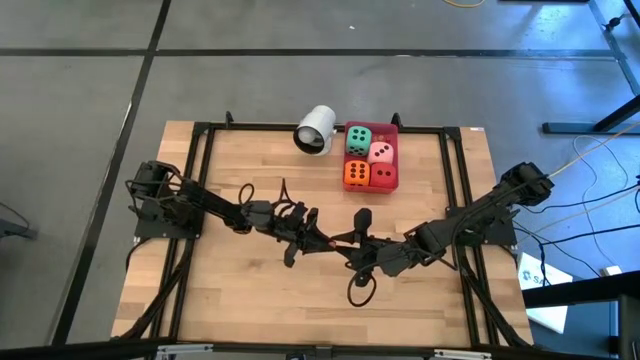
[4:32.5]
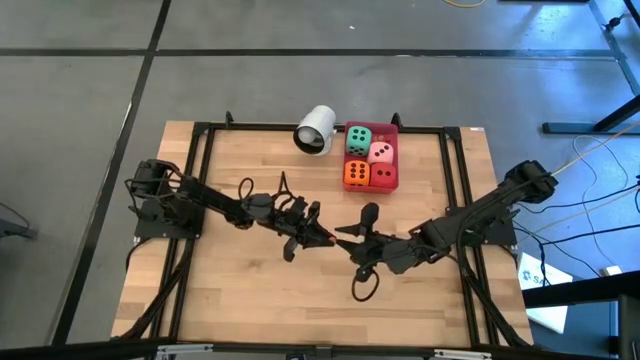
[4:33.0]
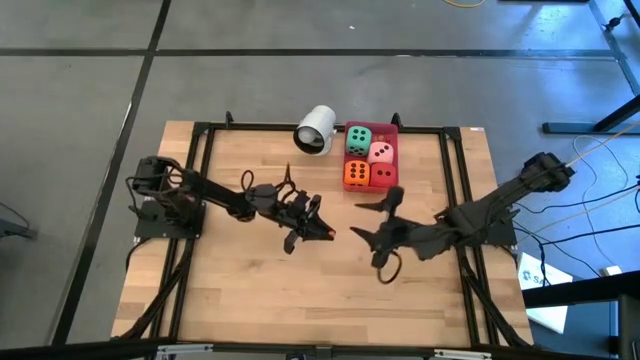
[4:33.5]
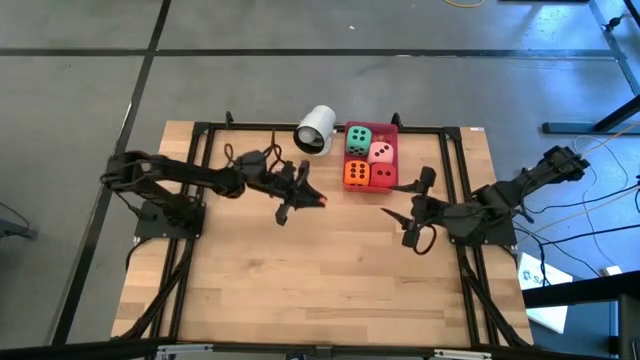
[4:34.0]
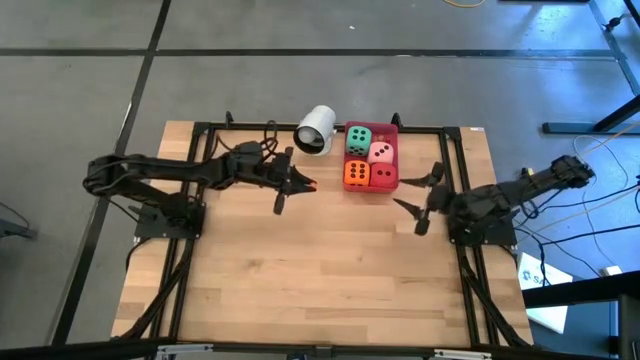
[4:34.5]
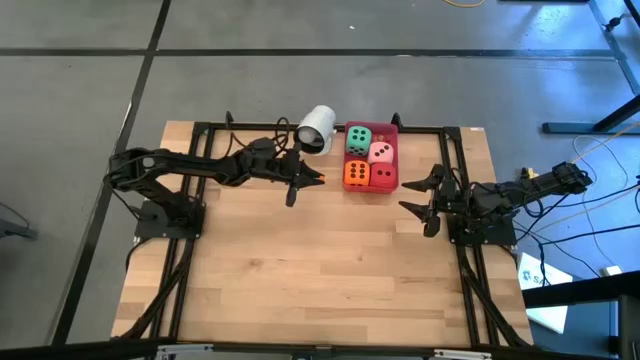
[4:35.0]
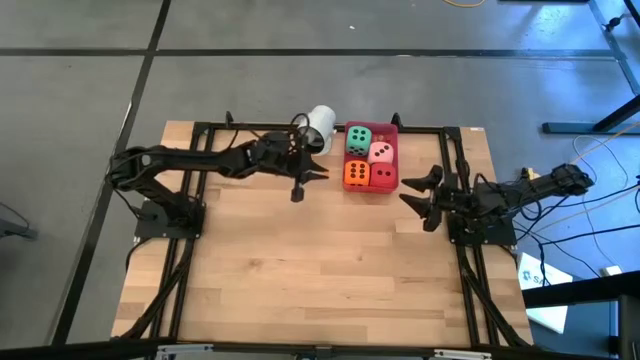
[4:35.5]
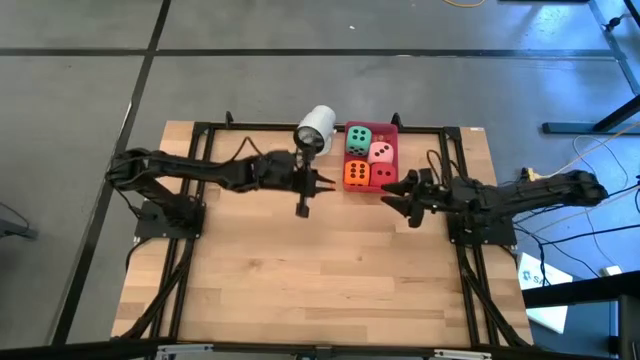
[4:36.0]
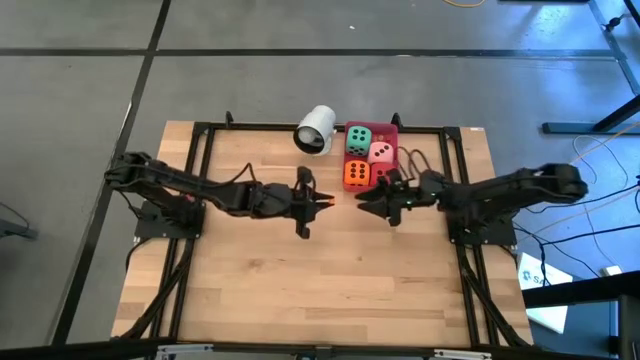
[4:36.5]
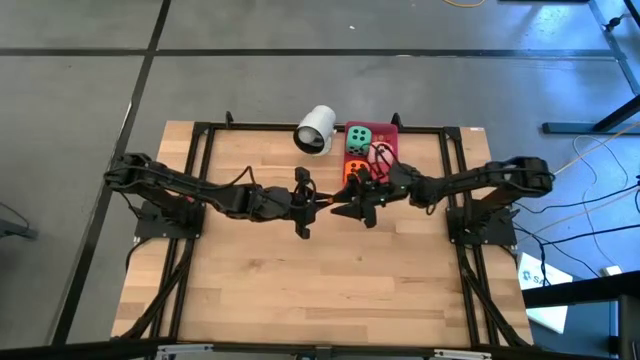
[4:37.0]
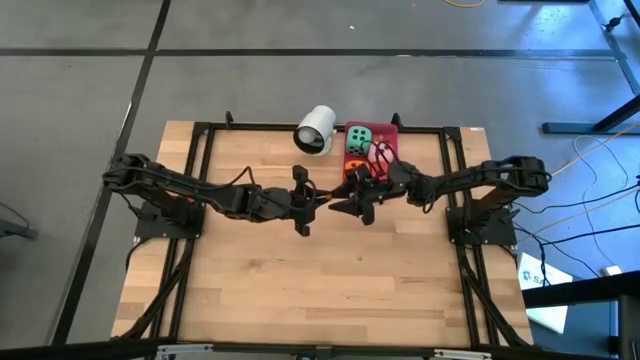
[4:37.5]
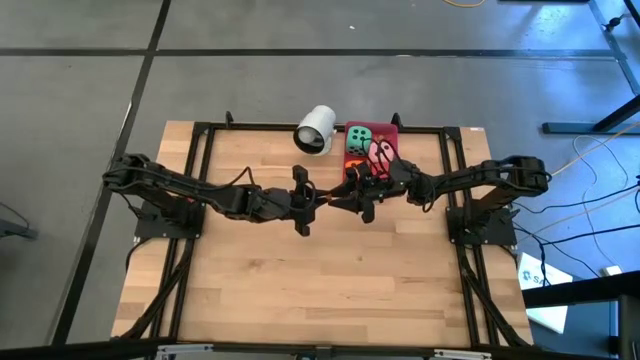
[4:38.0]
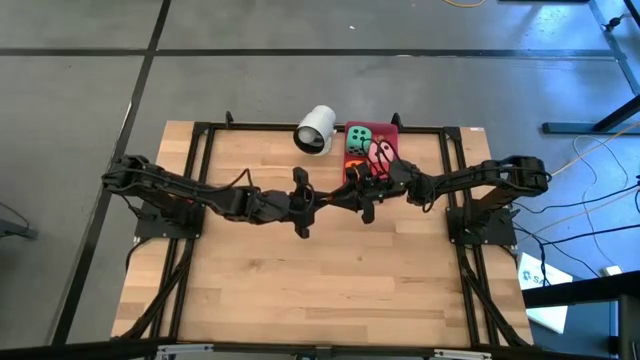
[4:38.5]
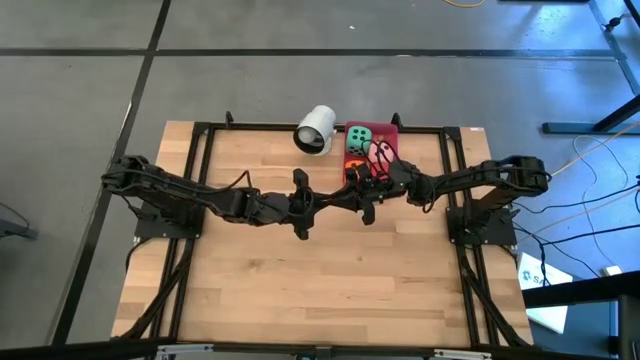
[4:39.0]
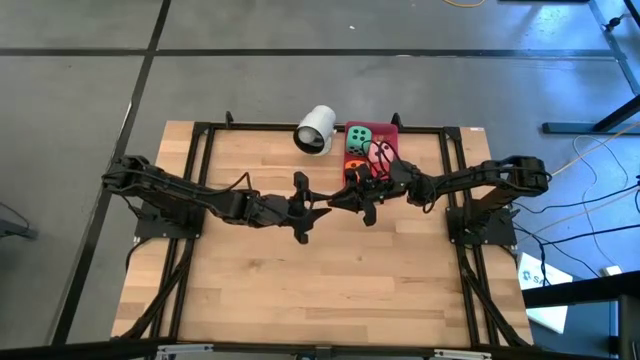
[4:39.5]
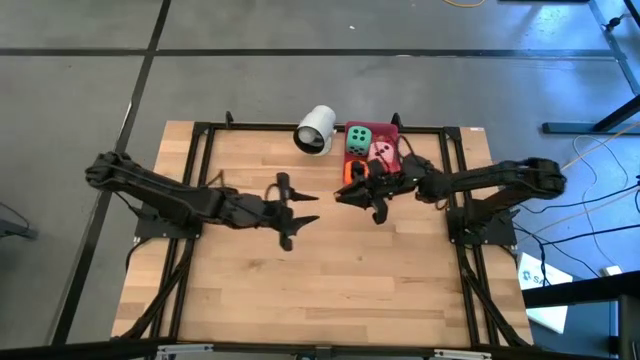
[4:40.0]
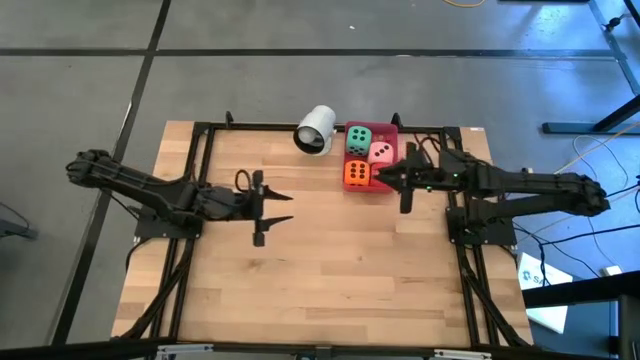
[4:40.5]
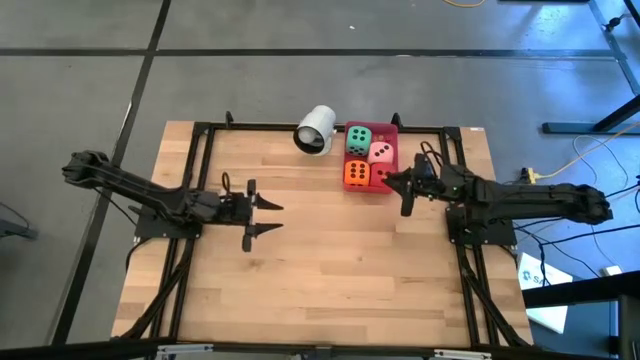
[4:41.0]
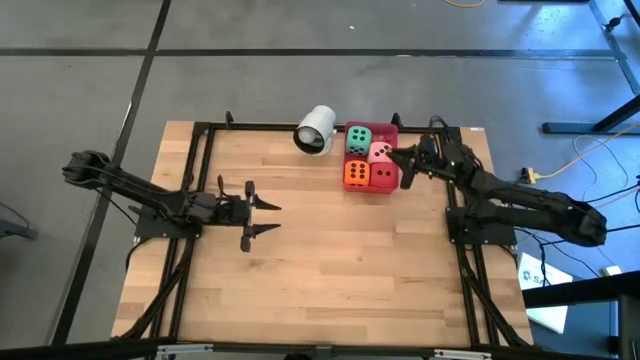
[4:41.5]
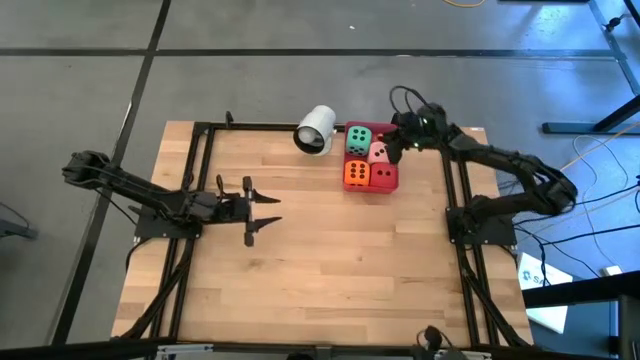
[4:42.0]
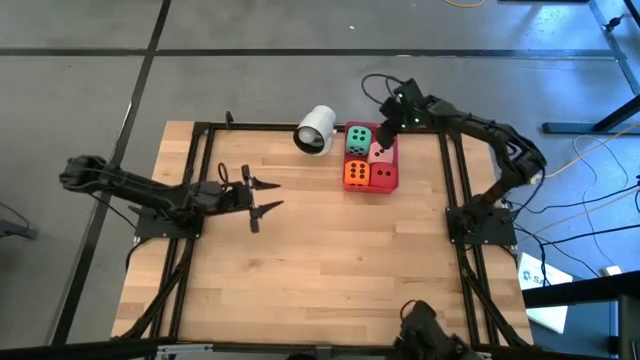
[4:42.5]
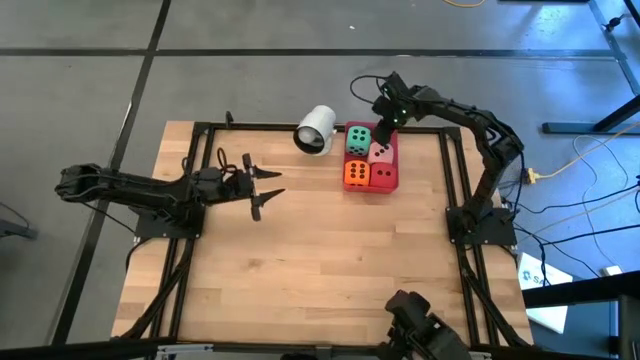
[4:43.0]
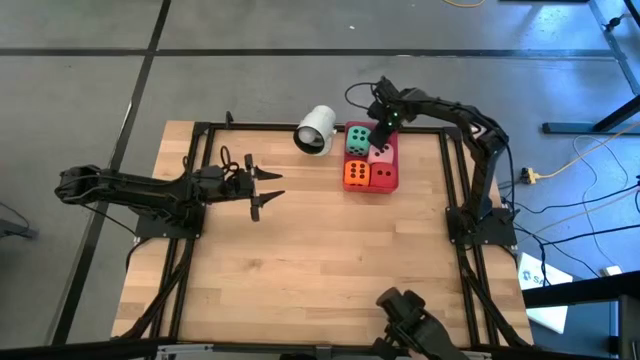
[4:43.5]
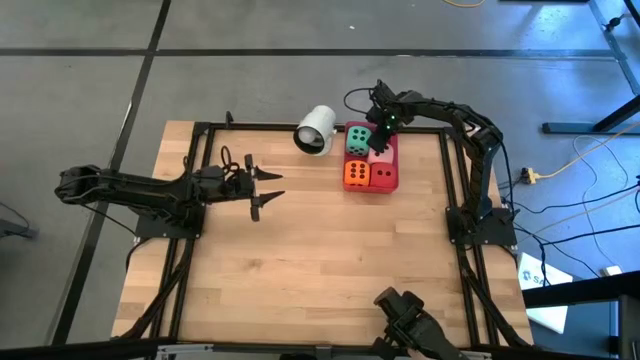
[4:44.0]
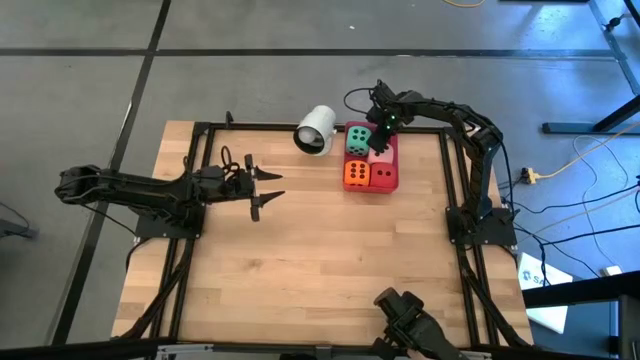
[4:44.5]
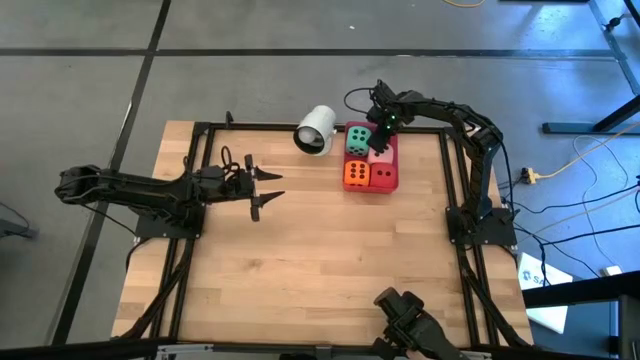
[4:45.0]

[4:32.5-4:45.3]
Task: Pick & Place Dice
Put the small orange dice into the red bin

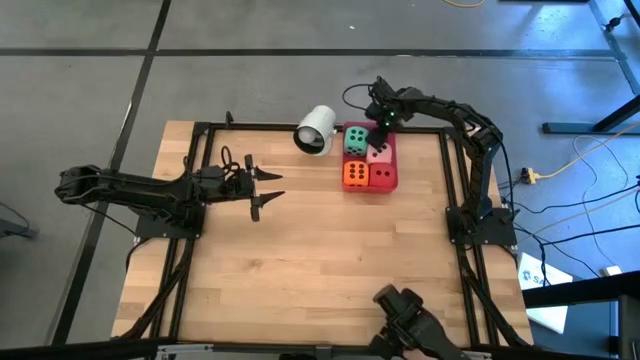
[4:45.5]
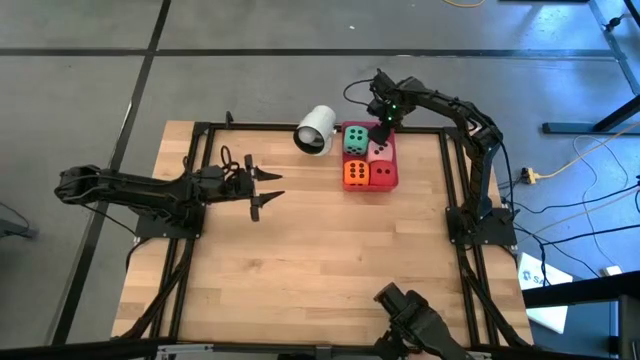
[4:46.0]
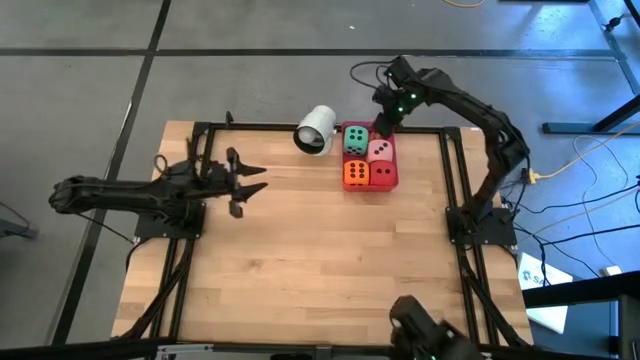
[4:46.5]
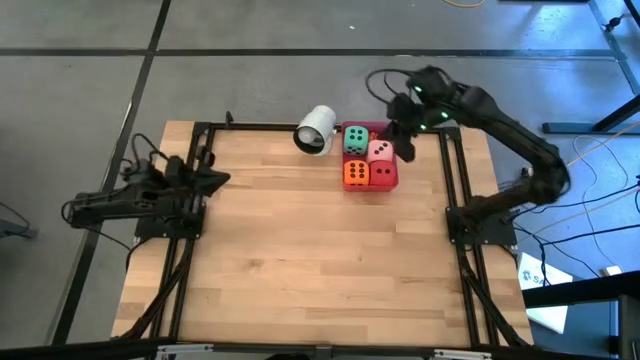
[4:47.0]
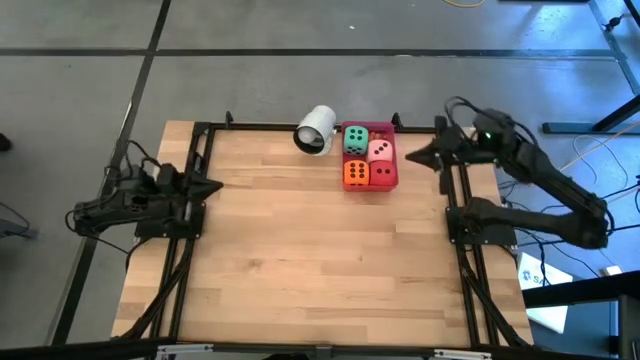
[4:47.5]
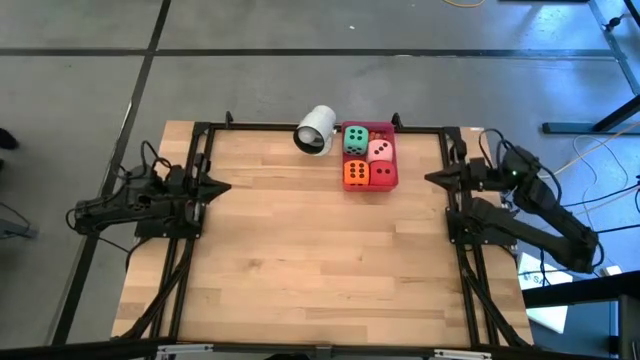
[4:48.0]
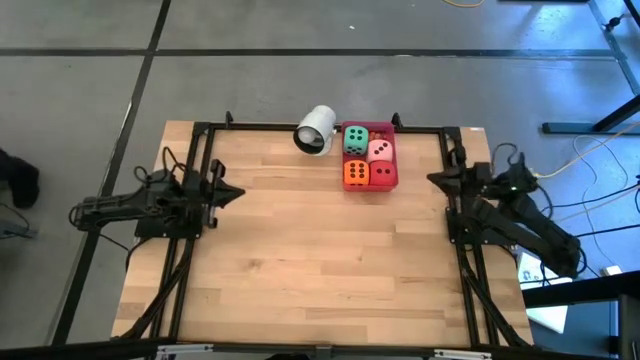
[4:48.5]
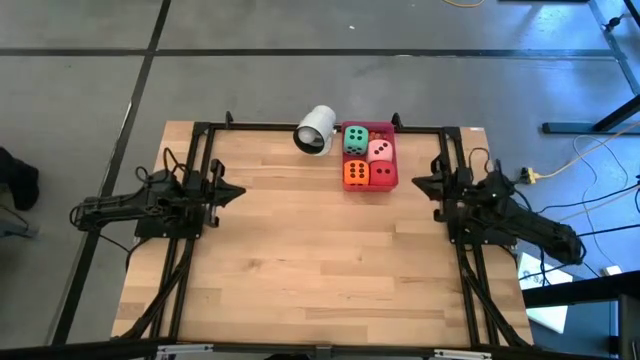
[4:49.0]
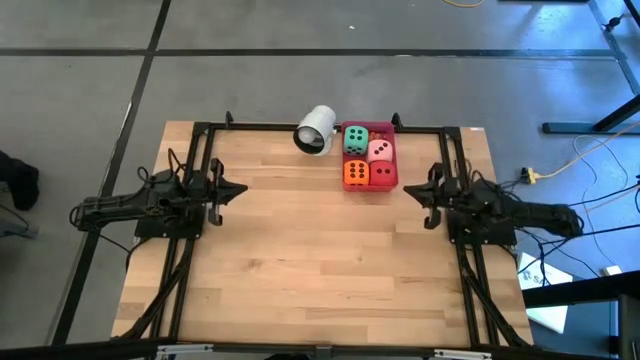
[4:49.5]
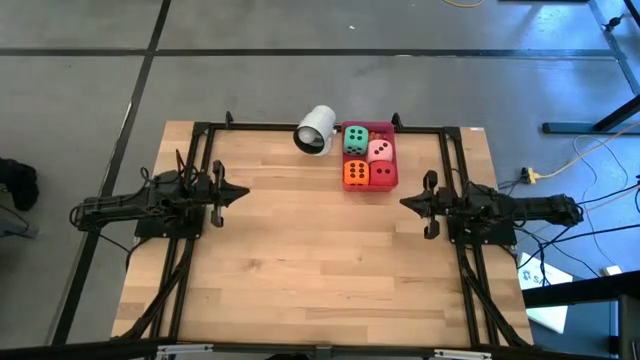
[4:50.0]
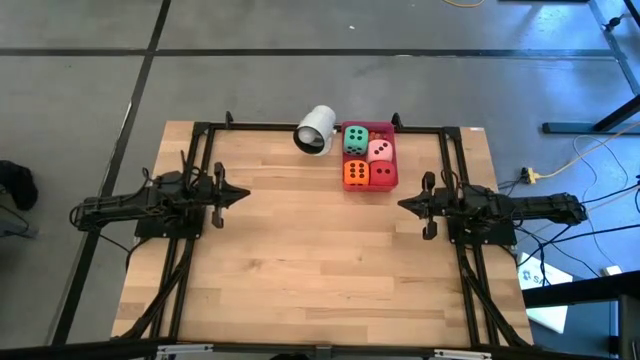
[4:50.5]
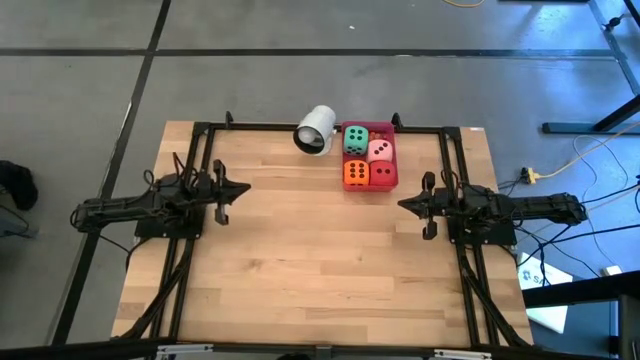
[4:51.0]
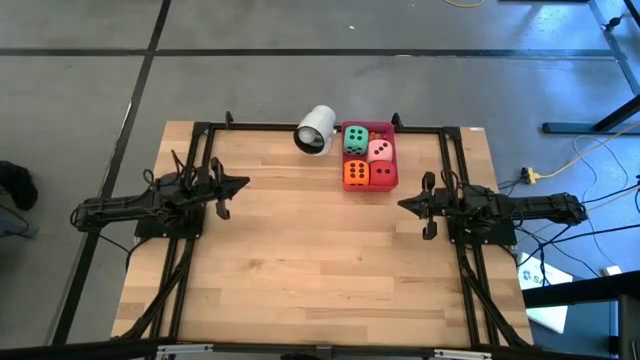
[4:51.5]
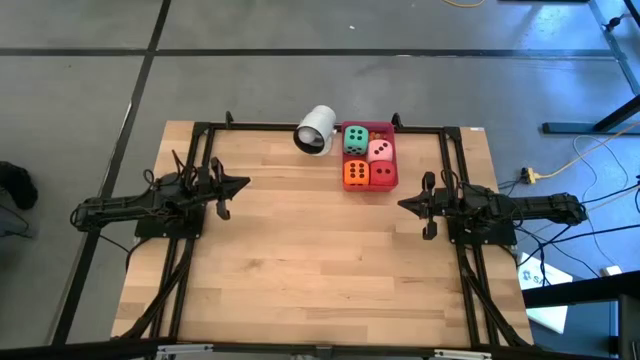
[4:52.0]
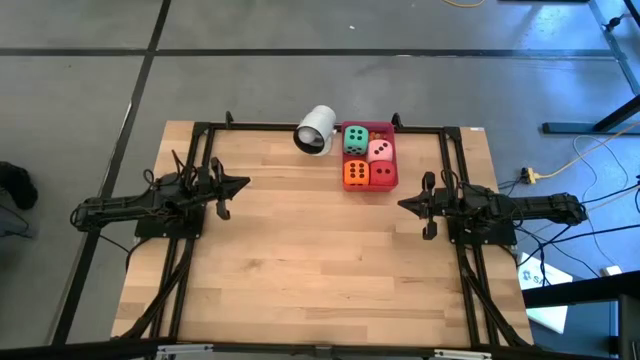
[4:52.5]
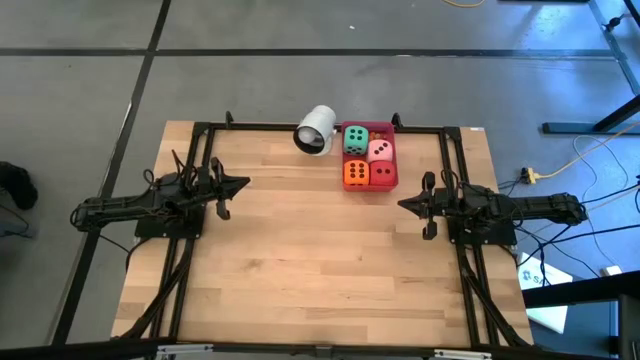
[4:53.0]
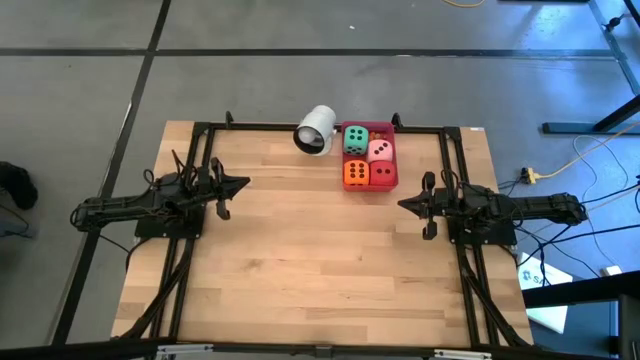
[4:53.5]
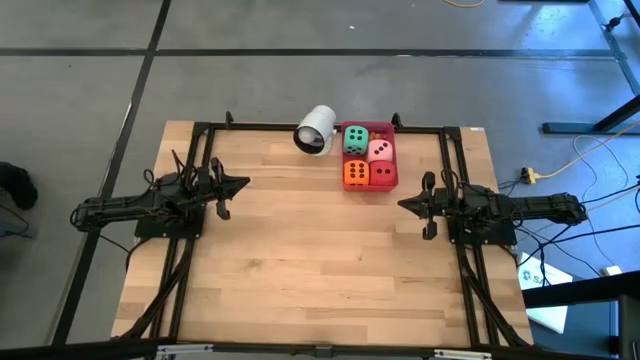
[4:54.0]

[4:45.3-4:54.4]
Return to Home Position
